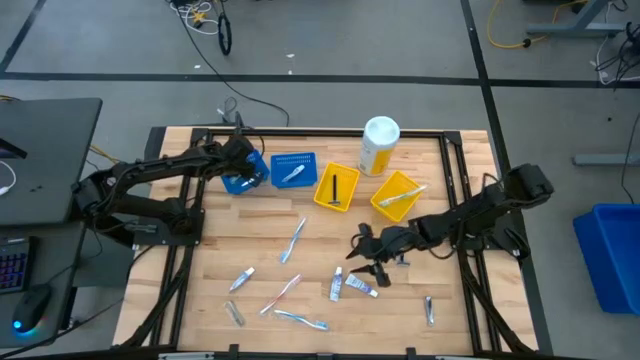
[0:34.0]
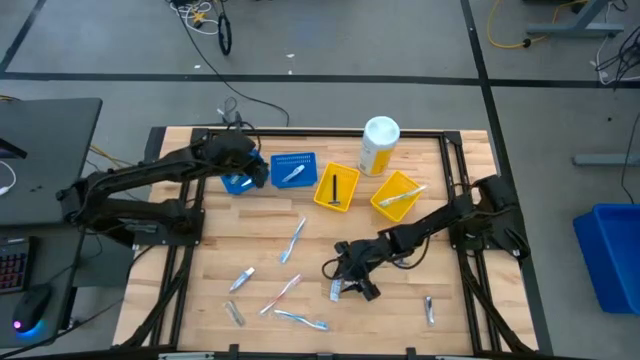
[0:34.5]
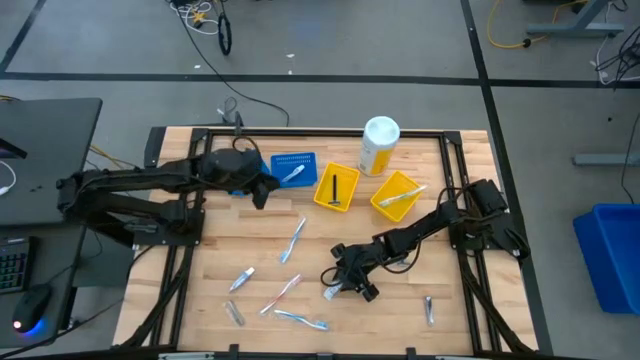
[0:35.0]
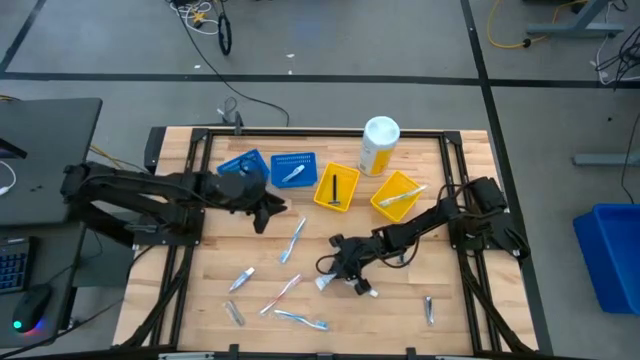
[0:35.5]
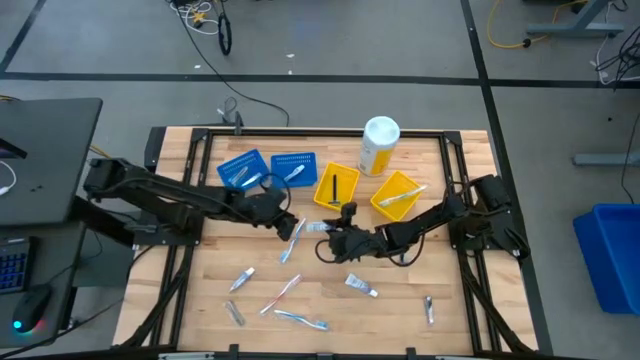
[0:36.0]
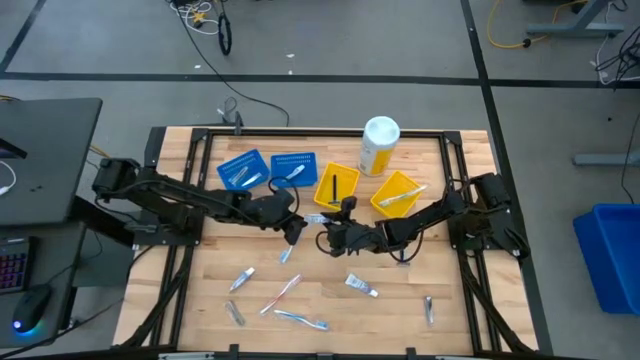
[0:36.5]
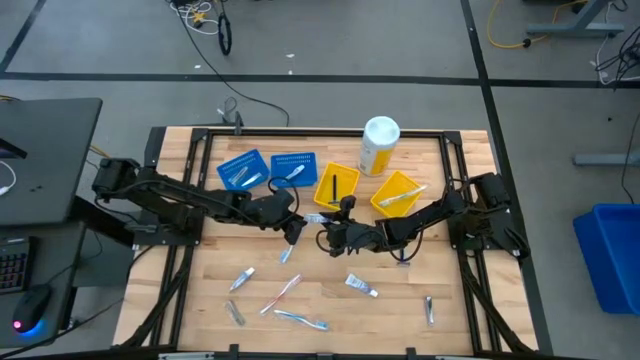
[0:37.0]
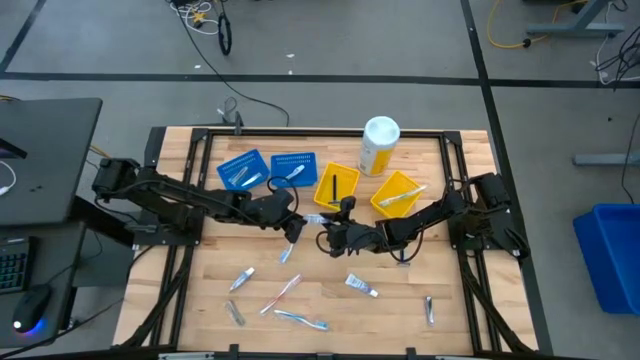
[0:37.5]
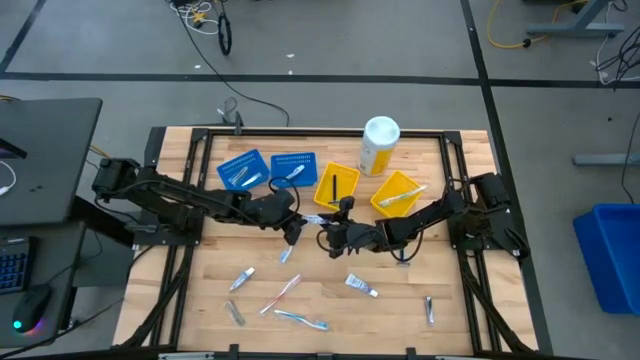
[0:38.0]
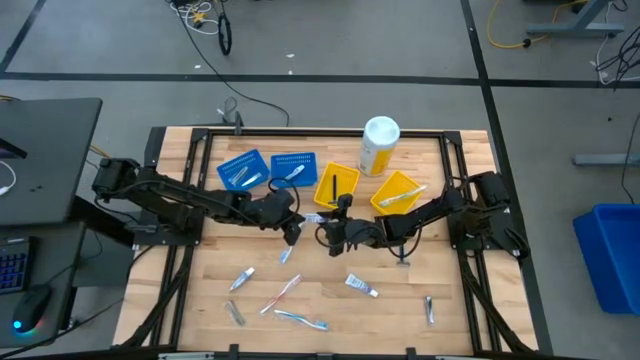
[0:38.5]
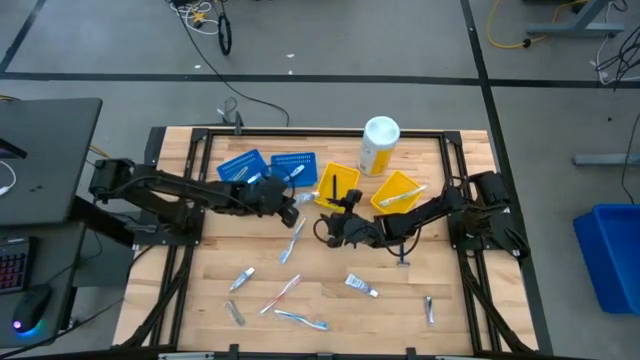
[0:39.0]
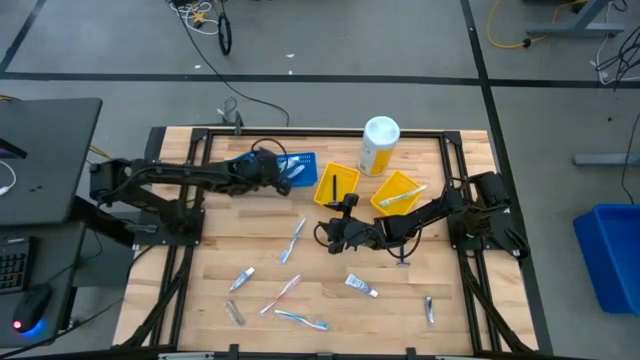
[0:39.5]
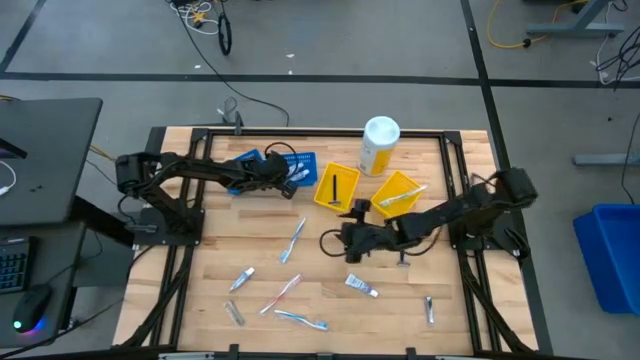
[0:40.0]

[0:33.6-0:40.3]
Task: Pick & Place Travel size toiletries
Put the white toothpaste into the right blue bin

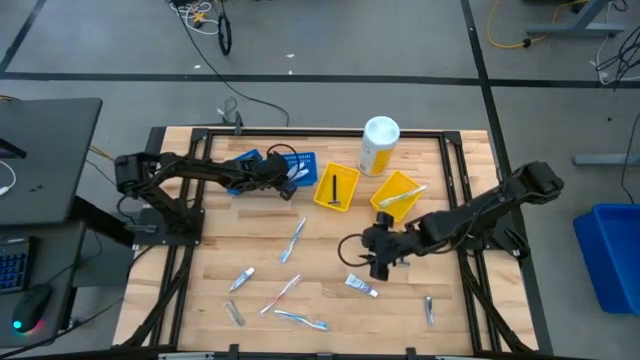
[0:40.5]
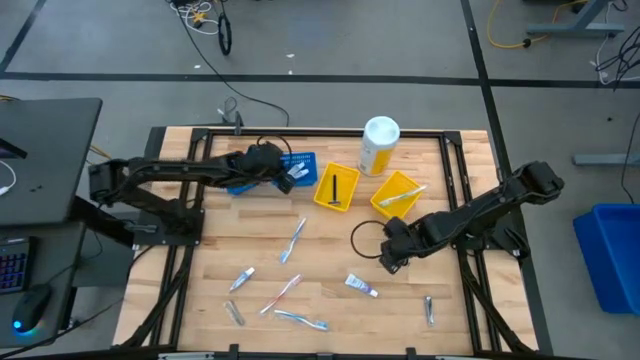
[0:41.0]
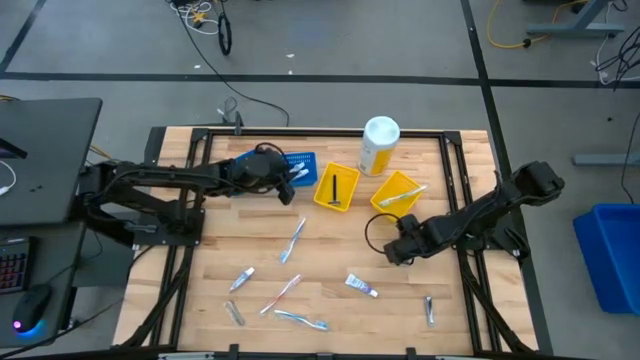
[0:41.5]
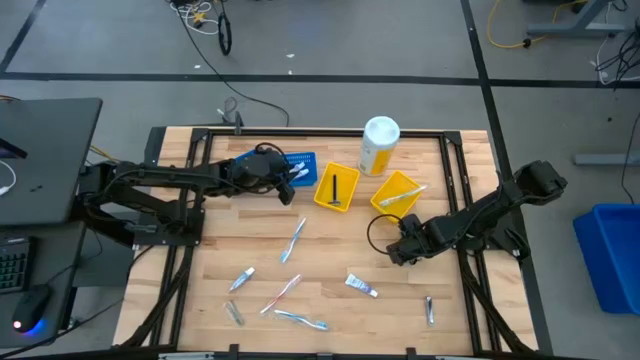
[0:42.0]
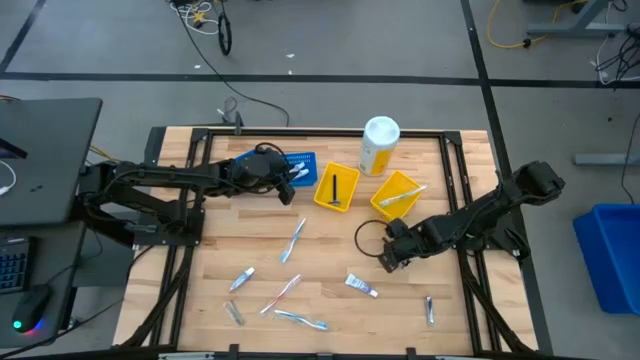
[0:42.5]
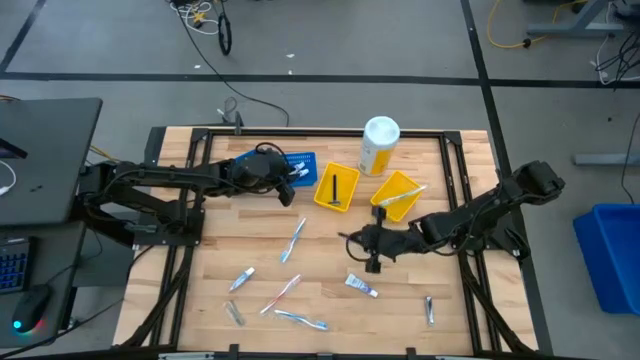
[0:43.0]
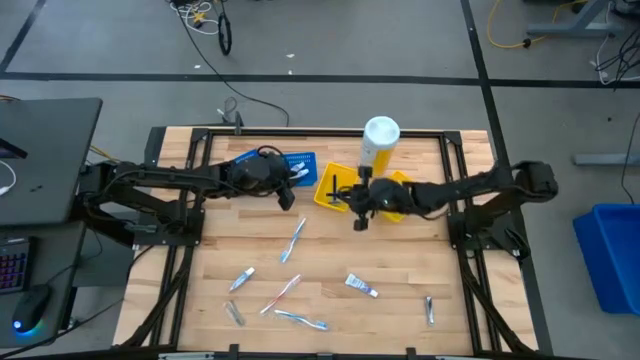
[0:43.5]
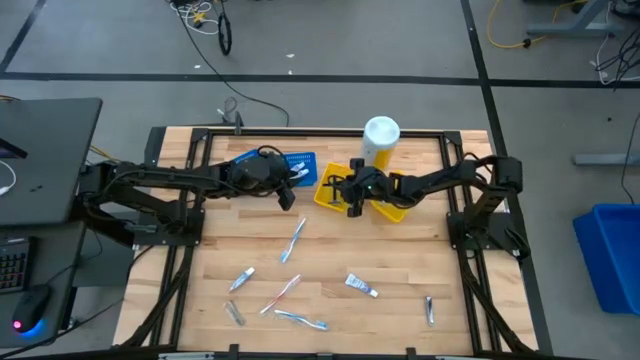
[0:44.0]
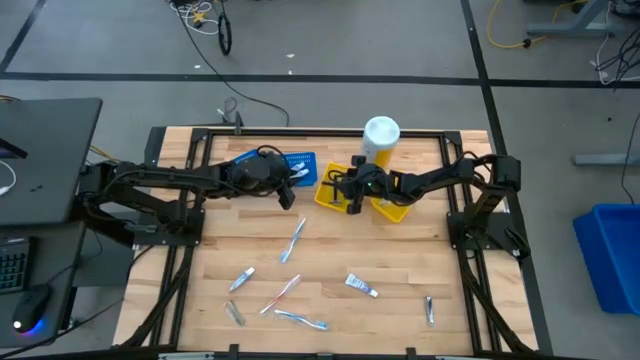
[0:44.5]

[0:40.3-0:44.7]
Put the blue razor into the left yellow bin

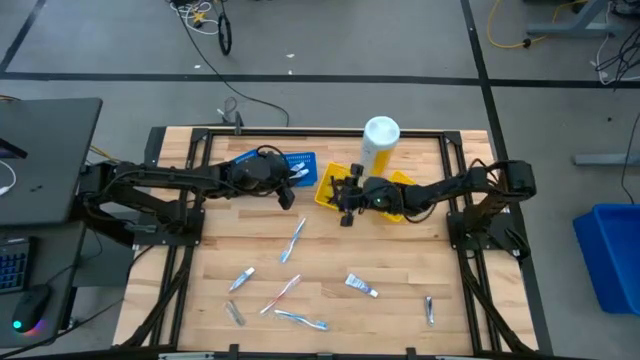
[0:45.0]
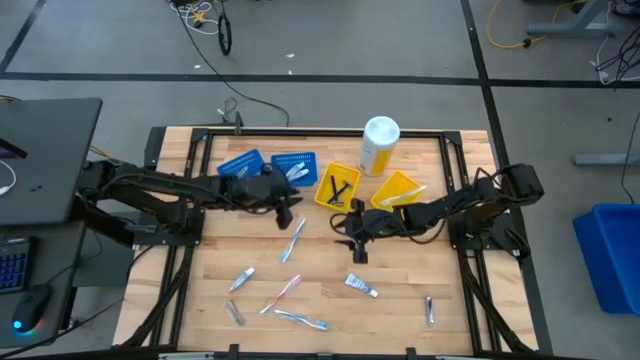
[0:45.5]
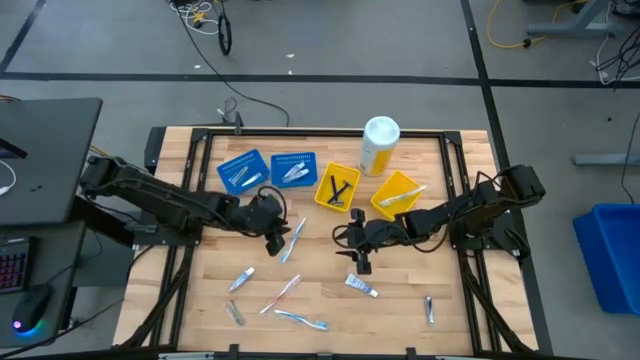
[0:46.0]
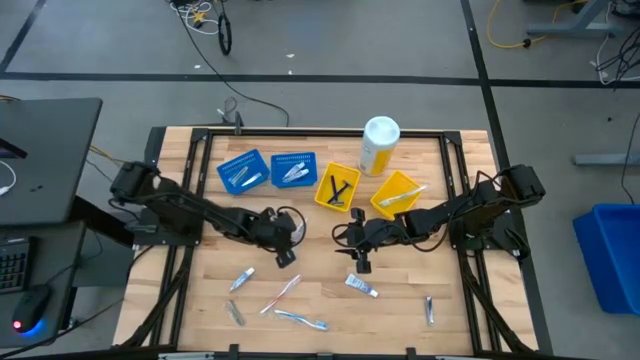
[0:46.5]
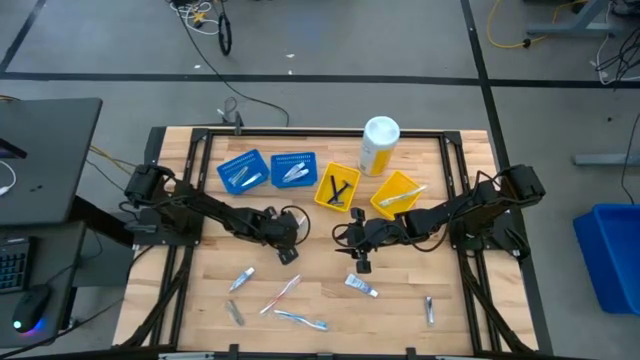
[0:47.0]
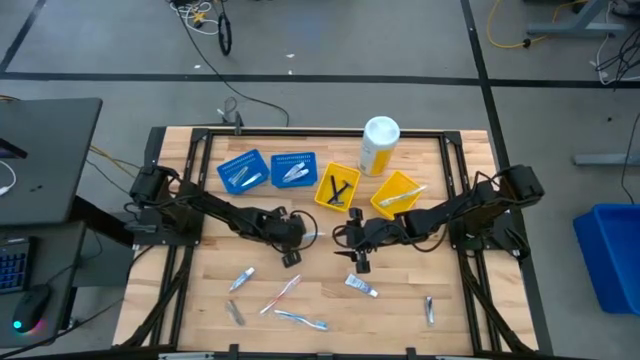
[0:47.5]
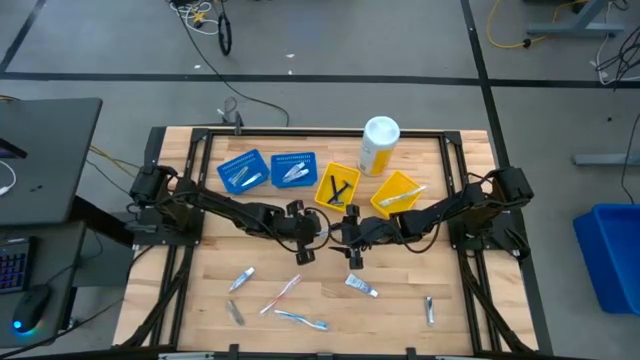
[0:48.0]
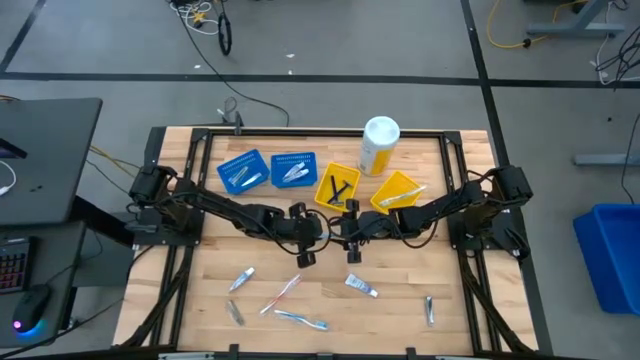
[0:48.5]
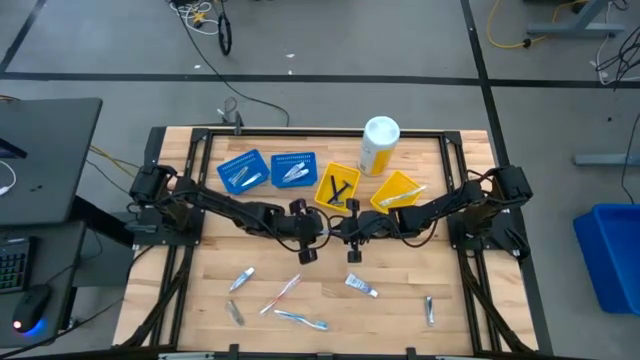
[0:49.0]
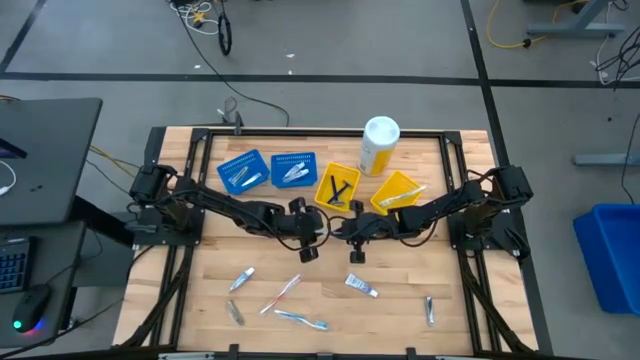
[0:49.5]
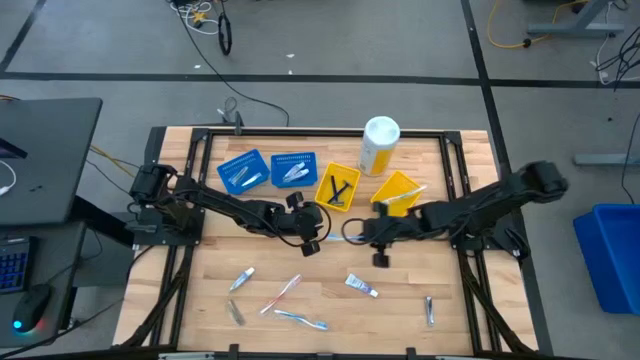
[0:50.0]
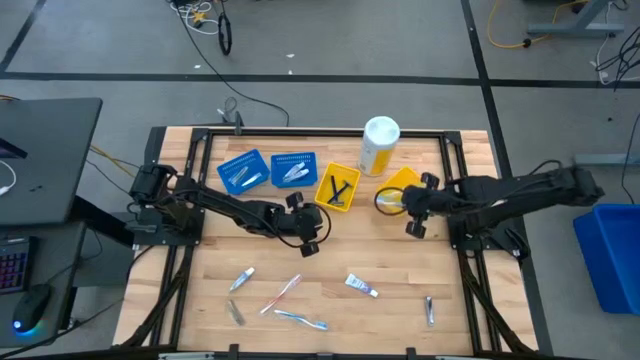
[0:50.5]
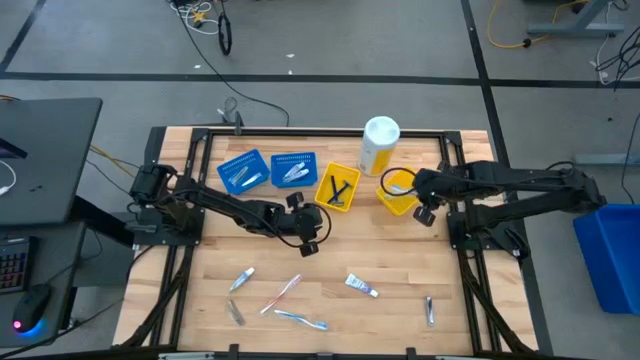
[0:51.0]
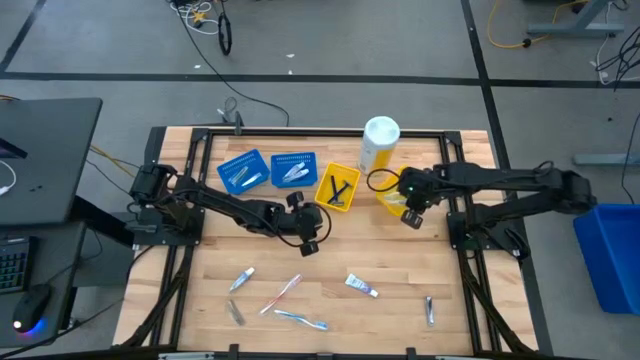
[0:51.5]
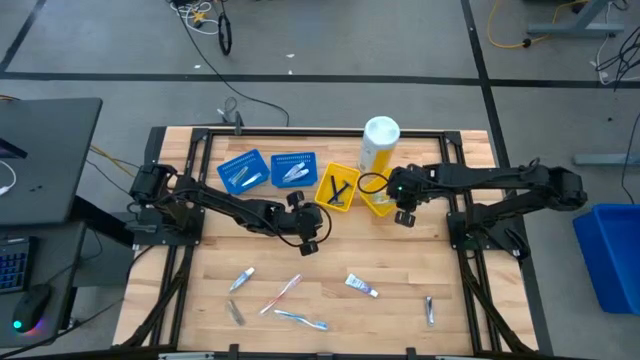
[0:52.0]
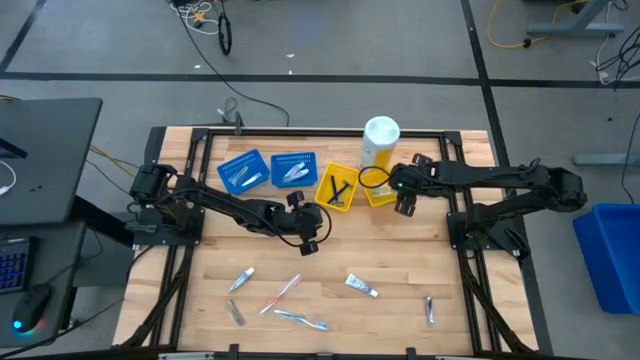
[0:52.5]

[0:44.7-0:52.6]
Put the blue toothbrush into the right yellow bin
